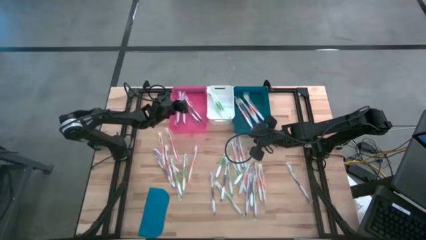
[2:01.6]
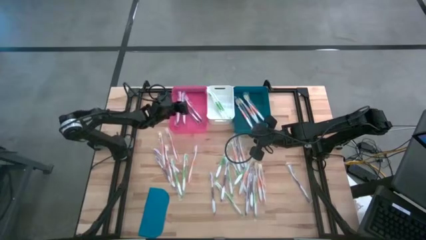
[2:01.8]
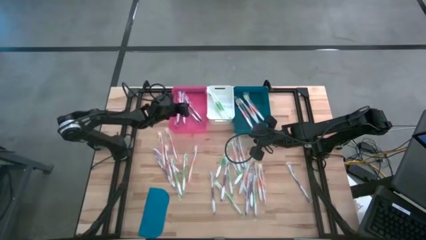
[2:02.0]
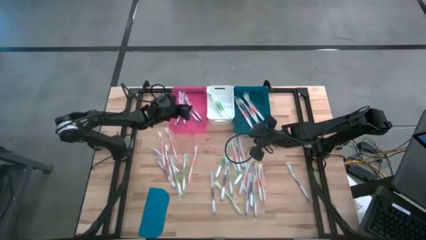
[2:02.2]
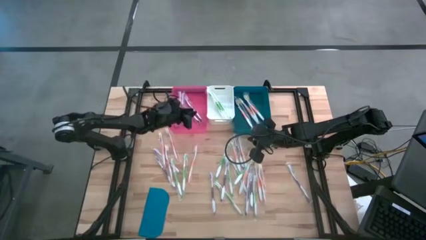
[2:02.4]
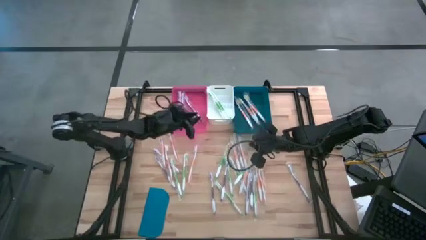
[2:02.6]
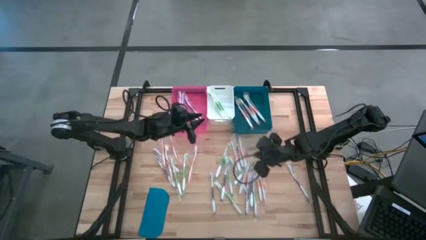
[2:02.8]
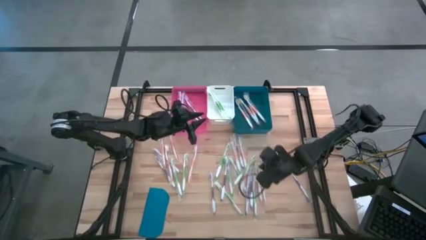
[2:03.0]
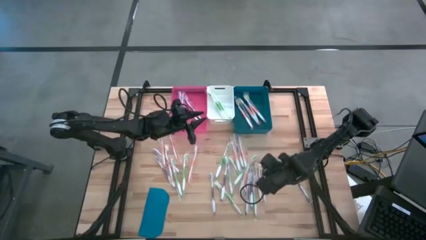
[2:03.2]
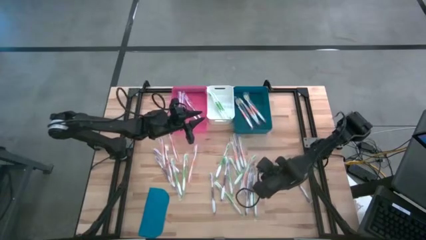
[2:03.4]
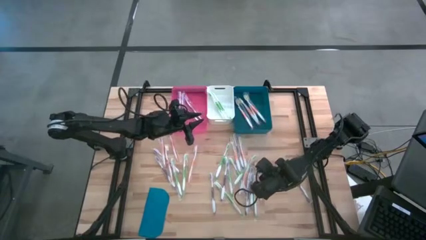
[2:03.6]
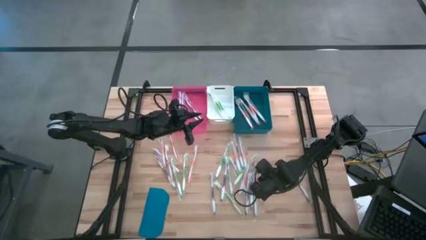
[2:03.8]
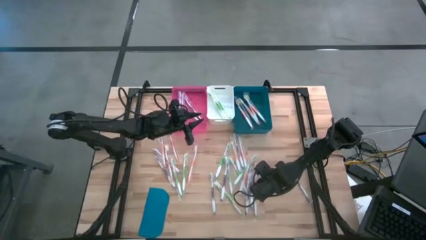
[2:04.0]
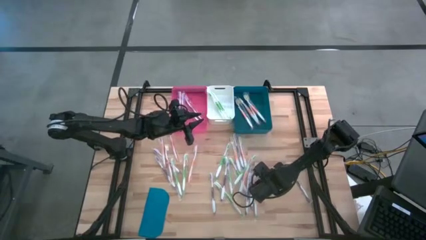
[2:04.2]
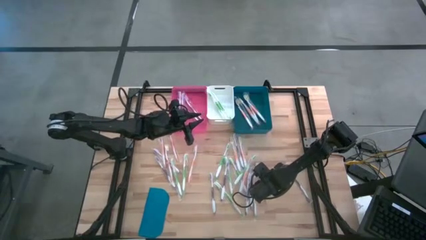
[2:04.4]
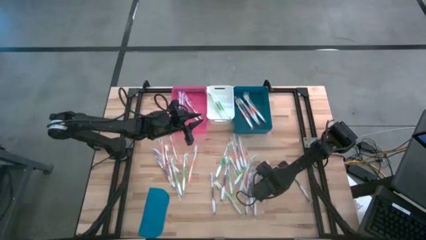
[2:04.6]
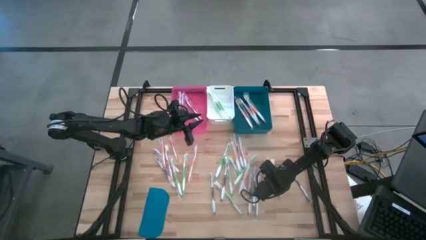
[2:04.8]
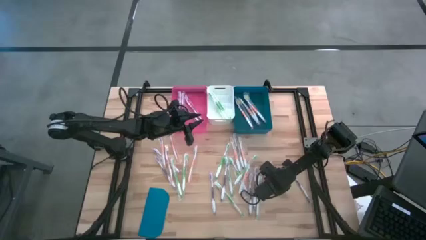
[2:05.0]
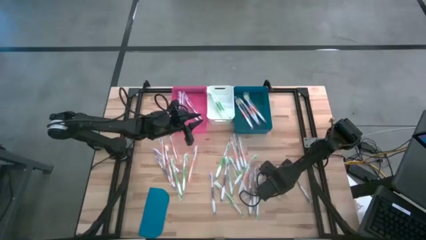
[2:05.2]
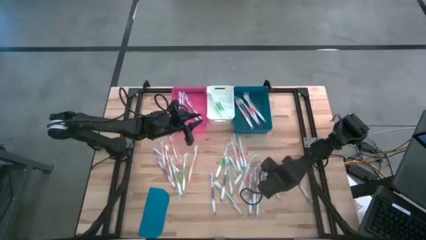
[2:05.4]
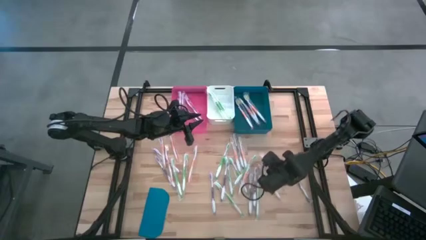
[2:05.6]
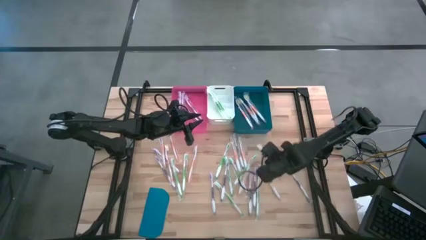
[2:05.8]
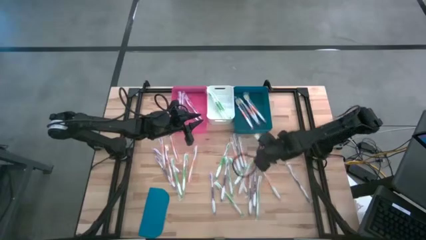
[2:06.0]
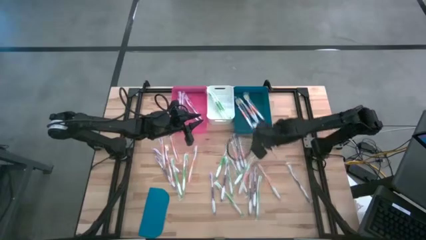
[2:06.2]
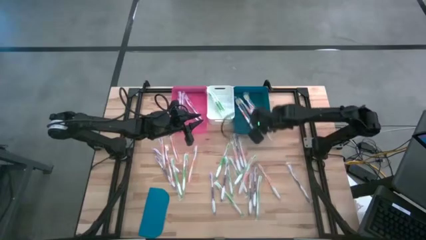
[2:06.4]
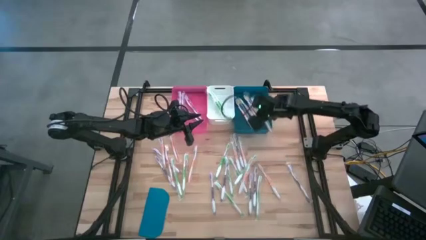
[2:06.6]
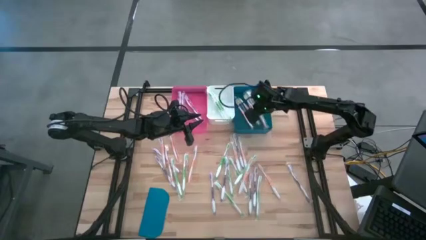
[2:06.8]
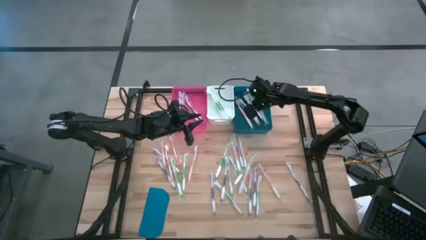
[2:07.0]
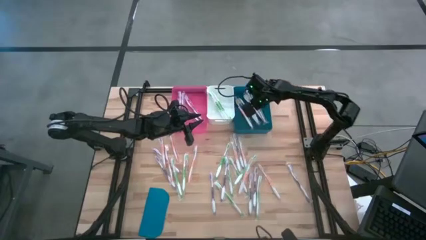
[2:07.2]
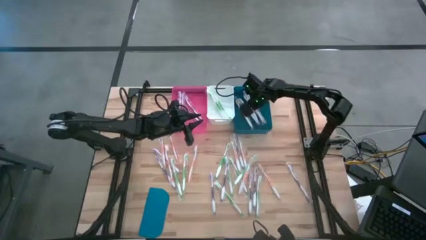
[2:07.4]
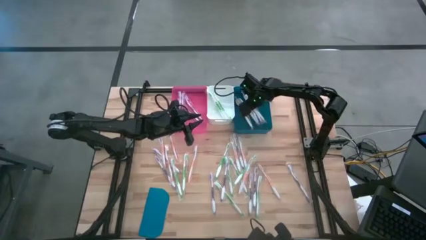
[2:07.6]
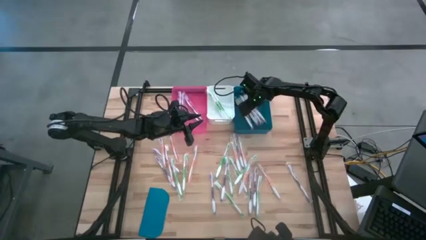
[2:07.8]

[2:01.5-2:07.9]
Task: Pick & Place Toothbrushes
Put the orange toothbrush into the blue bin

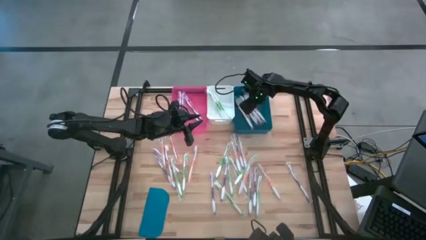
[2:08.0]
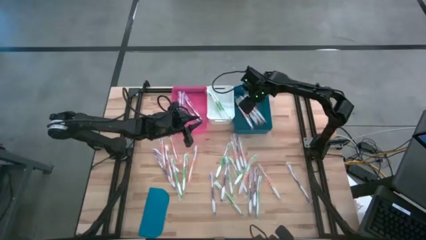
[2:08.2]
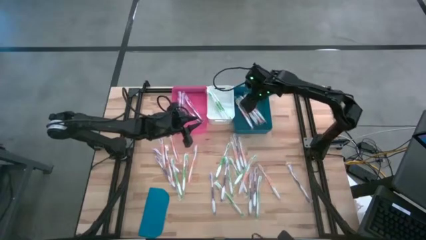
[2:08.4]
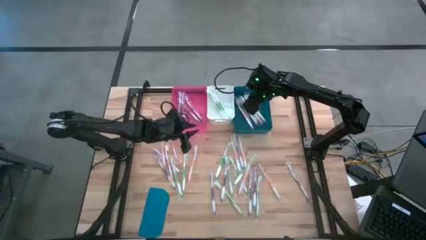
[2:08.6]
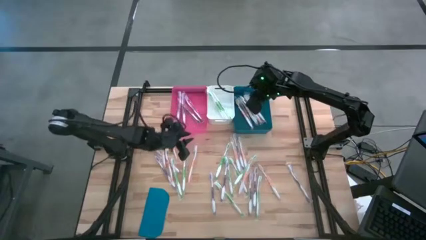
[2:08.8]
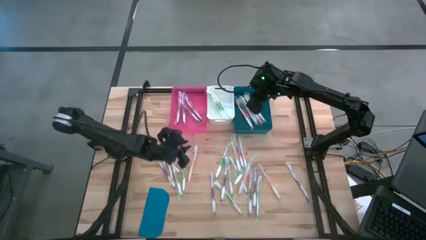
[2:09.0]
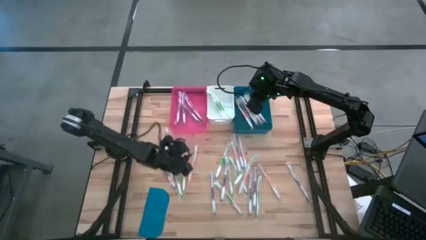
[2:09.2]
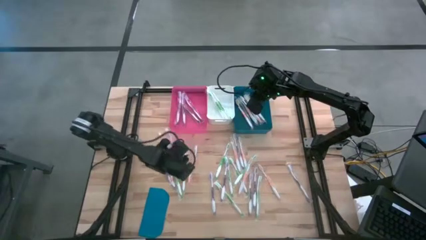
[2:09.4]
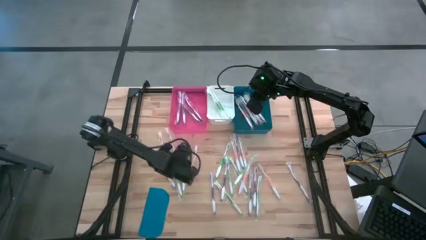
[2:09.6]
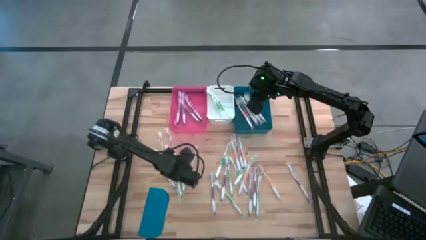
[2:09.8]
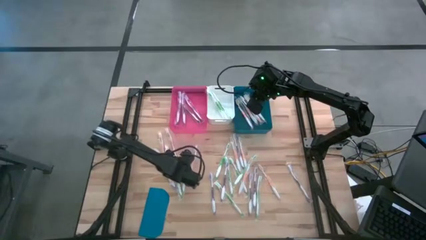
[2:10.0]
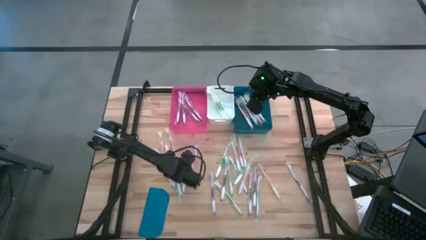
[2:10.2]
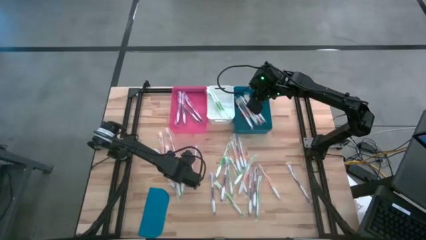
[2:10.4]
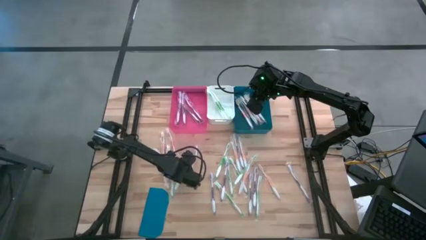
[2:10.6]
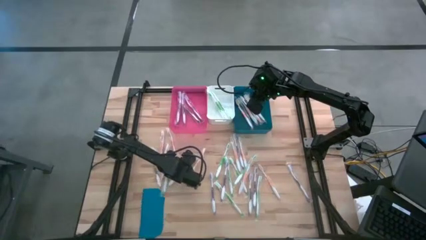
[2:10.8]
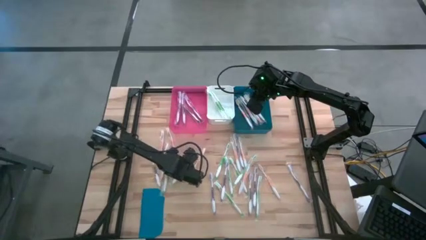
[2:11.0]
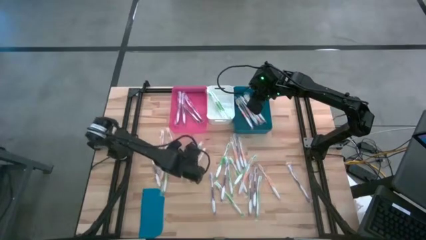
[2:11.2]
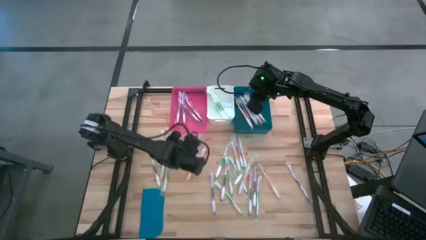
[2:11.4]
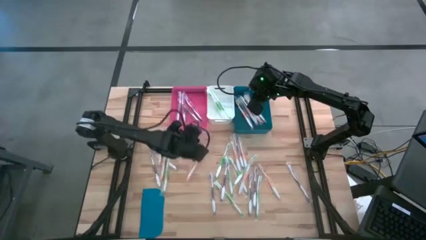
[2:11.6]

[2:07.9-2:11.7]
Put the green toothbrush into the white bin

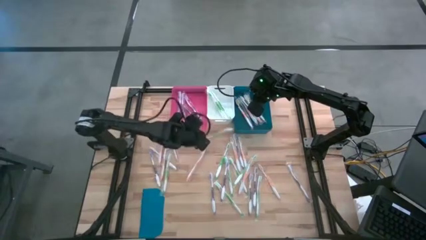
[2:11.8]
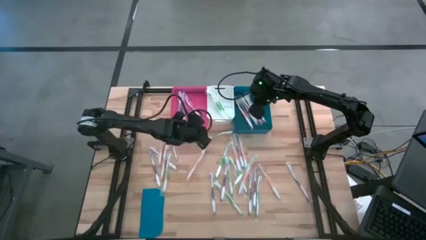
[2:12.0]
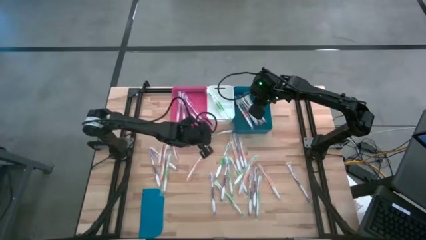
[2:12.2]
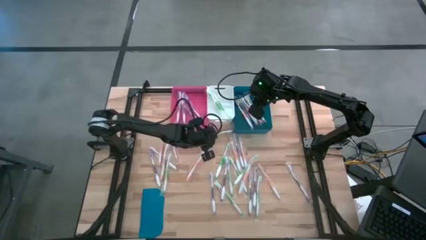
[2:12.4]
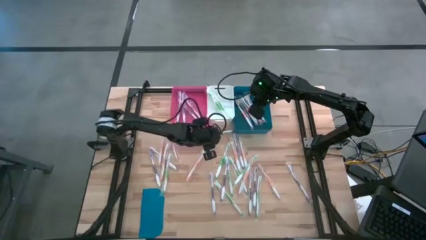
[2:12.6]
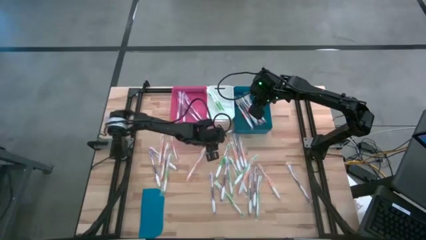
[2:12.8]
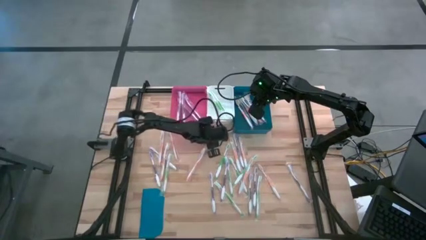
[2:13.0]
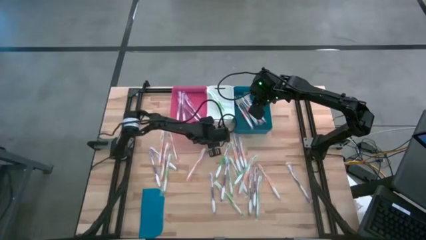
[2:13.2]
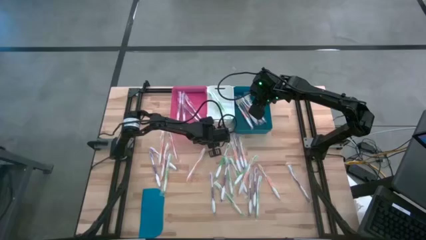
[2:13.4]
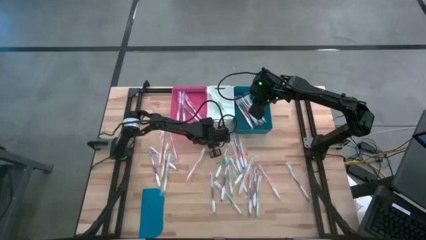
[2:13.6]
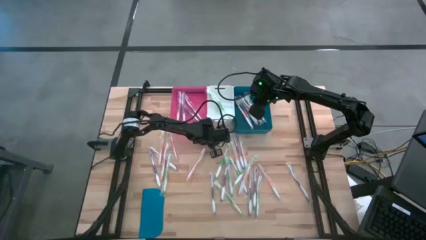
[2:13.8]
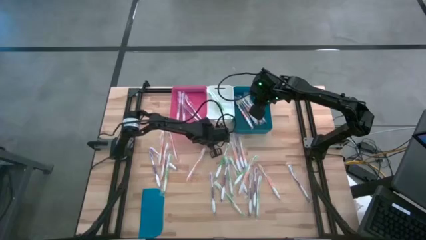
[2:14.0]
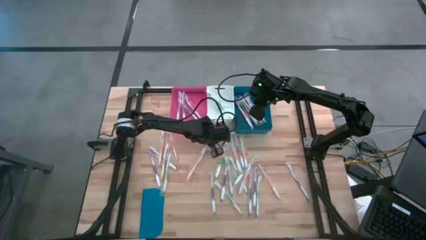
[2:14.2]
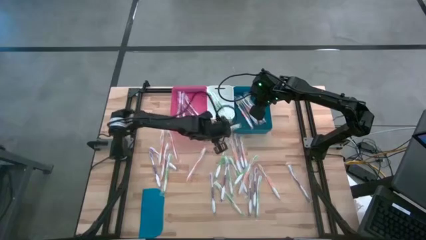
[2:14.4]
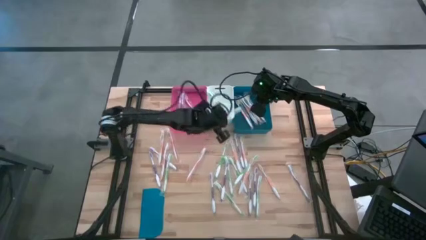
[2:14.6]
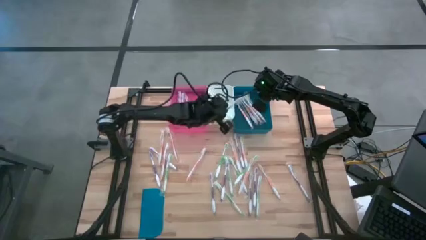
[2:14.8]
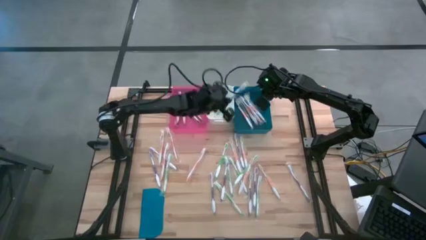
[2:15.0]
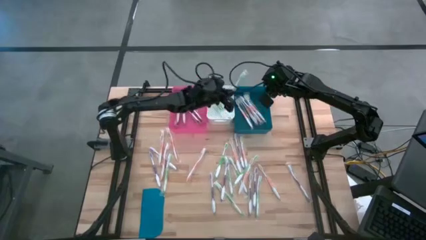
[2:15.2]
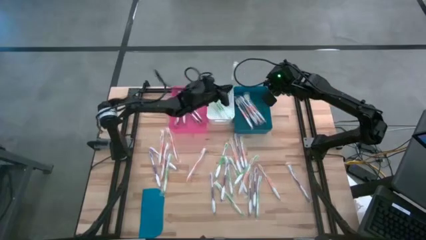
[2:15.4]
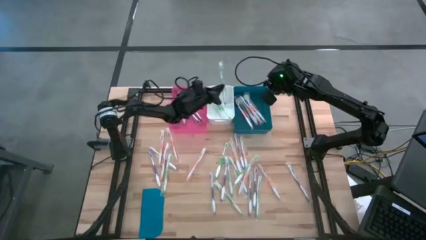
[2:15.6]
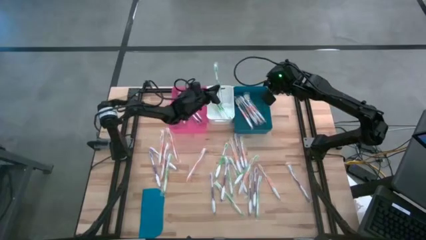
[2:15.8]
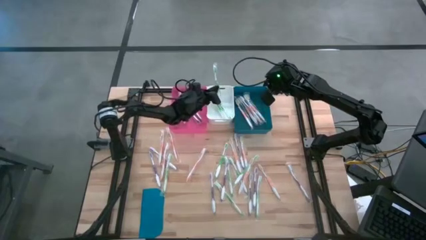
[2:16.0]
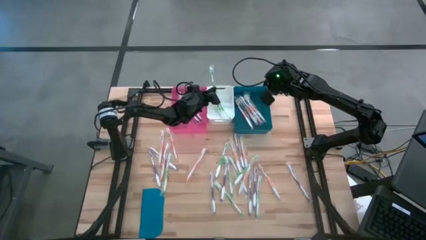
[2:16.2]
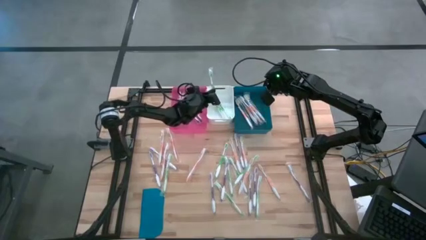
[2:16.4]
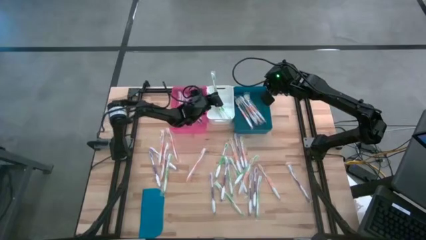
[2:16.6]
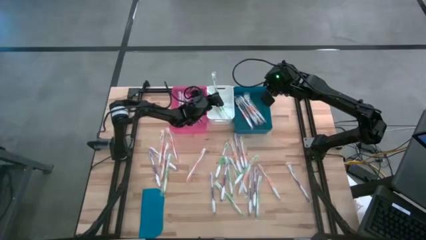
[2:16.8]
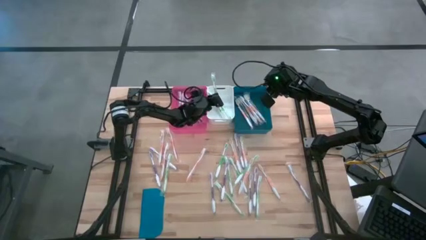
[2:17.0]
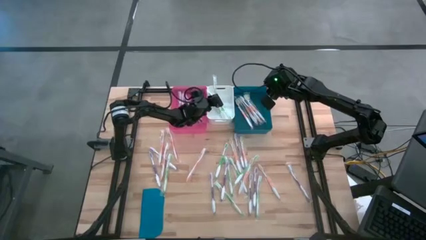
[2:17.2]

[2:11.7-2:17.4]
Put the green toothbrush into the white bin
